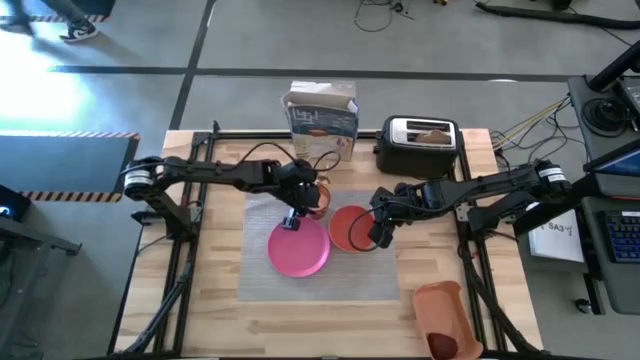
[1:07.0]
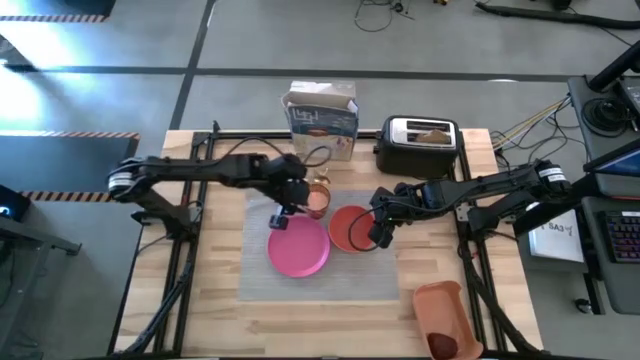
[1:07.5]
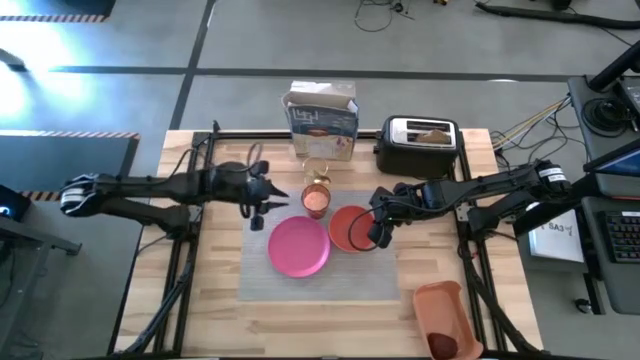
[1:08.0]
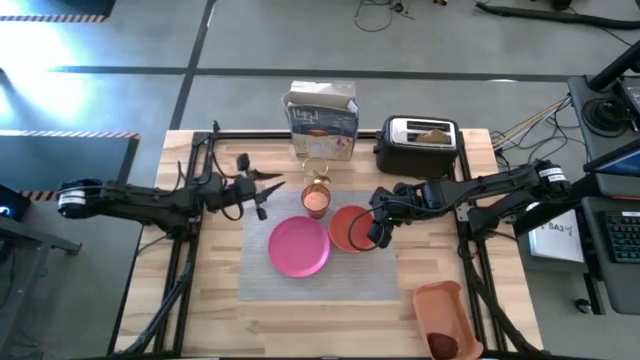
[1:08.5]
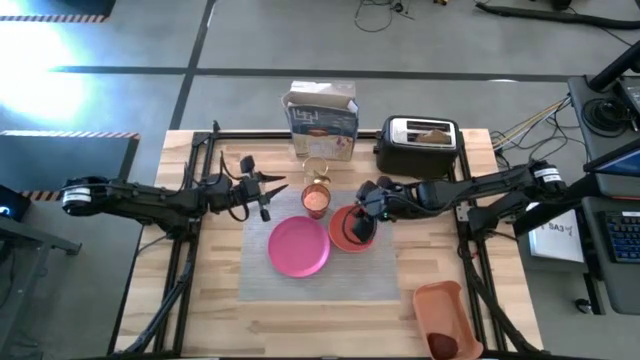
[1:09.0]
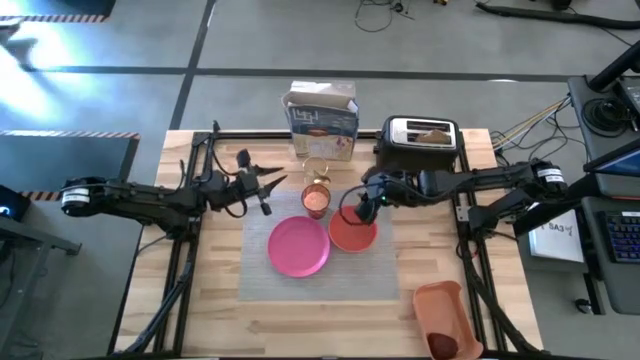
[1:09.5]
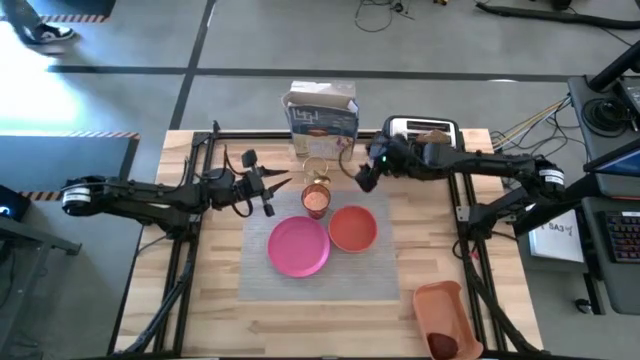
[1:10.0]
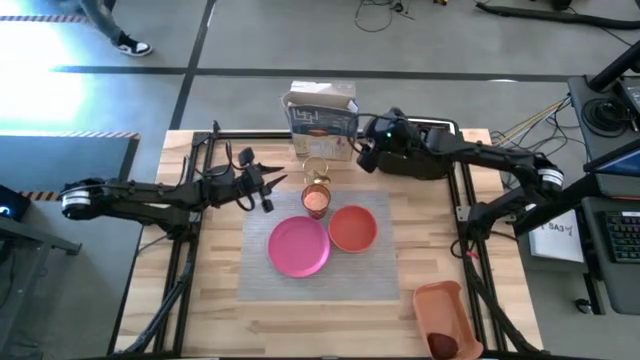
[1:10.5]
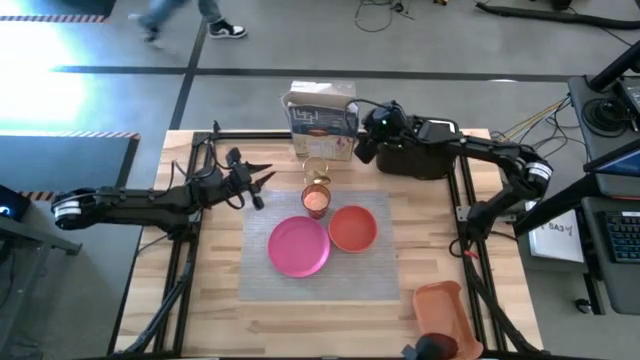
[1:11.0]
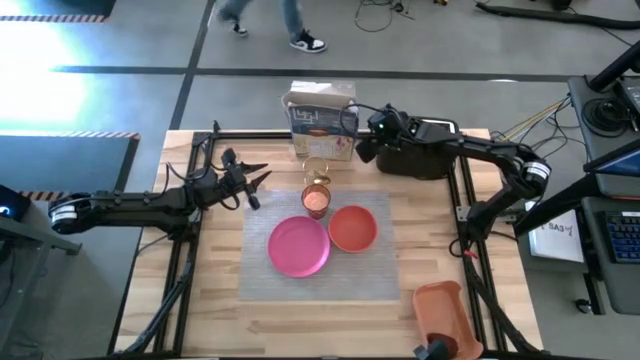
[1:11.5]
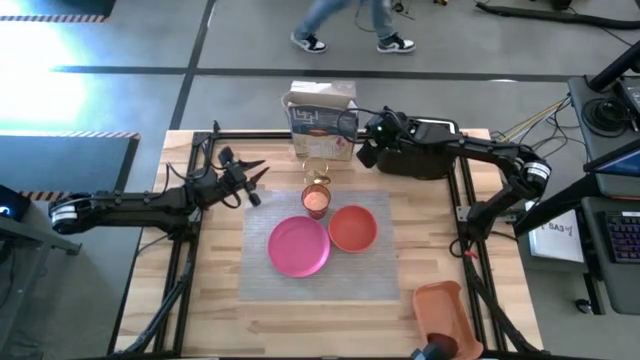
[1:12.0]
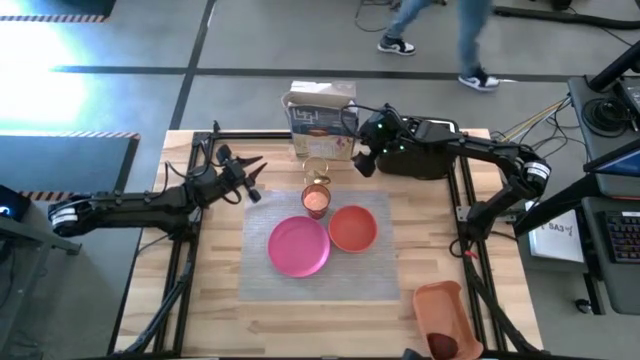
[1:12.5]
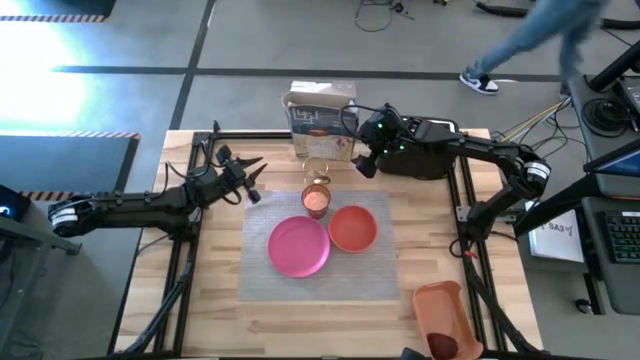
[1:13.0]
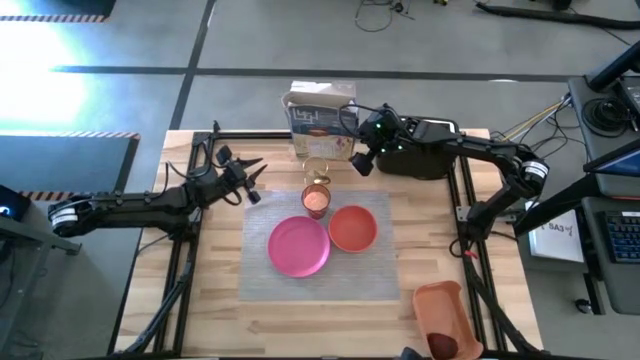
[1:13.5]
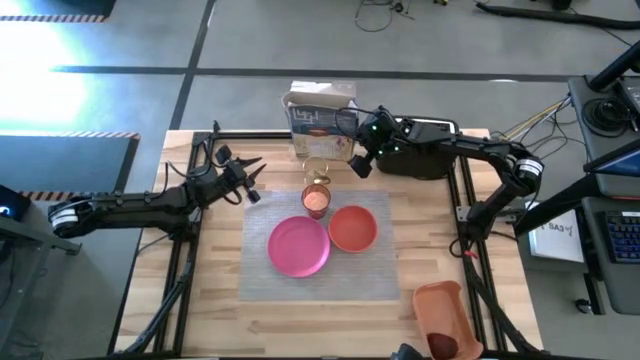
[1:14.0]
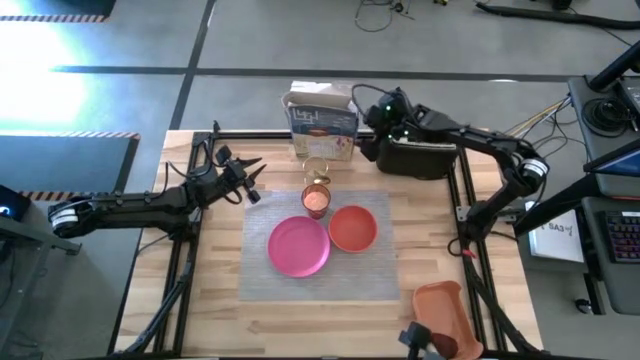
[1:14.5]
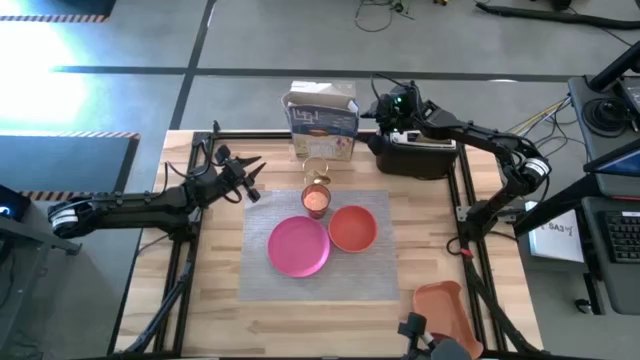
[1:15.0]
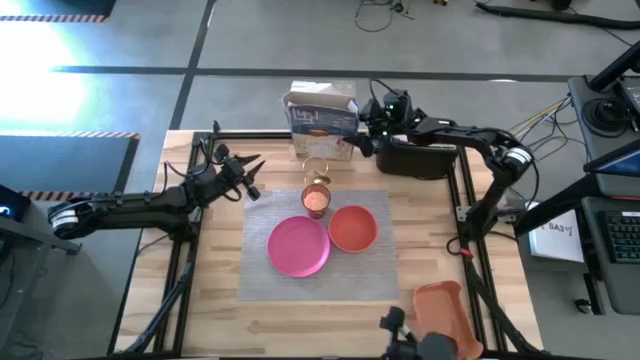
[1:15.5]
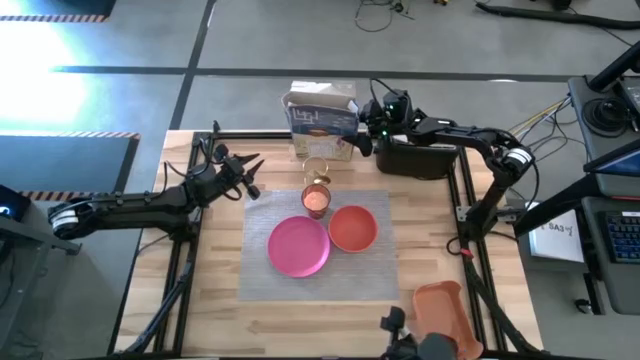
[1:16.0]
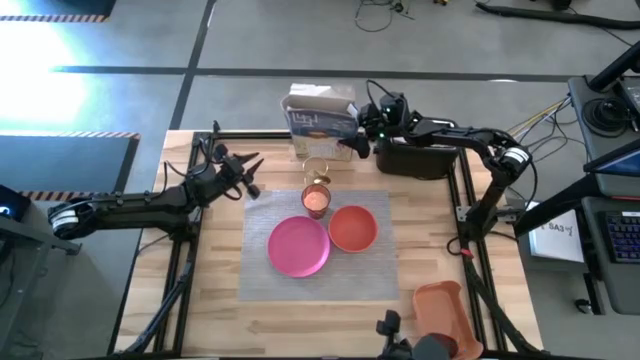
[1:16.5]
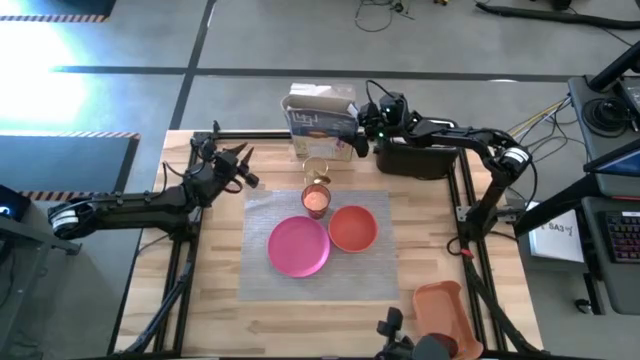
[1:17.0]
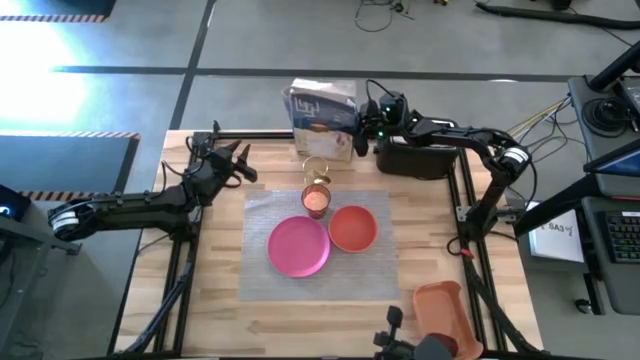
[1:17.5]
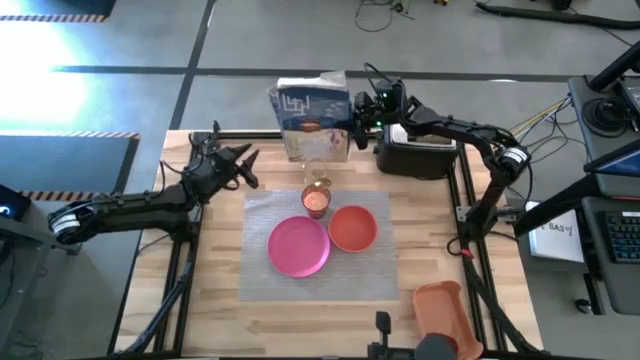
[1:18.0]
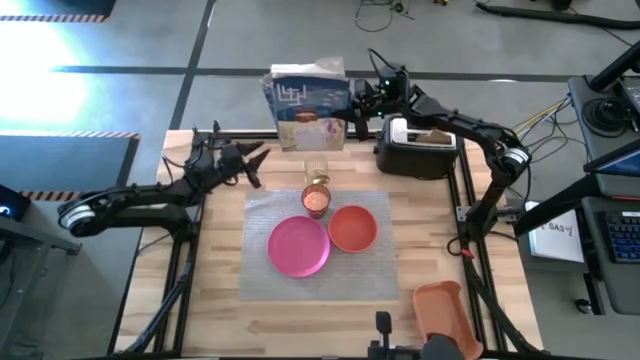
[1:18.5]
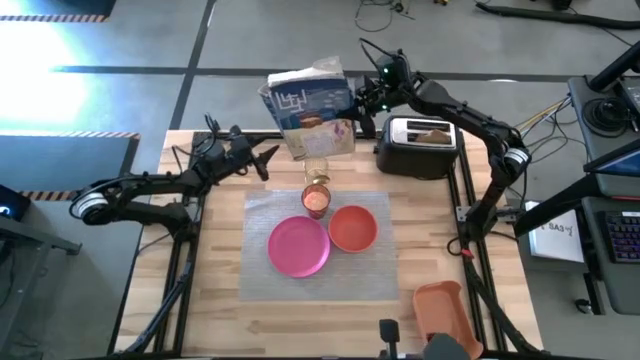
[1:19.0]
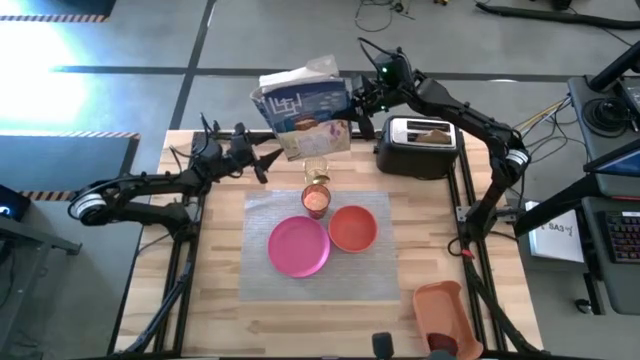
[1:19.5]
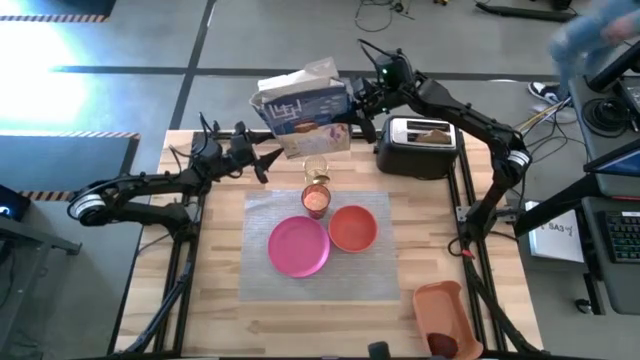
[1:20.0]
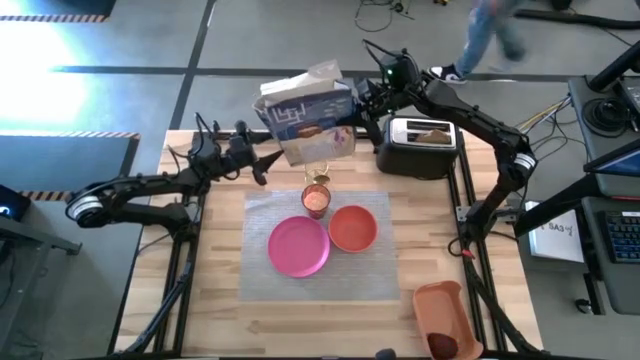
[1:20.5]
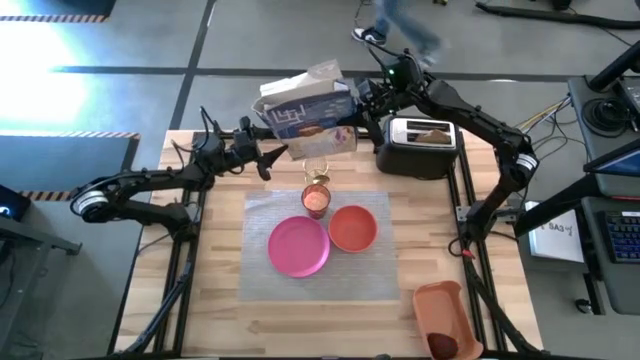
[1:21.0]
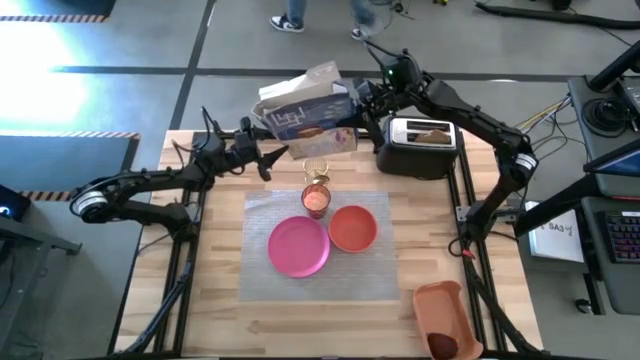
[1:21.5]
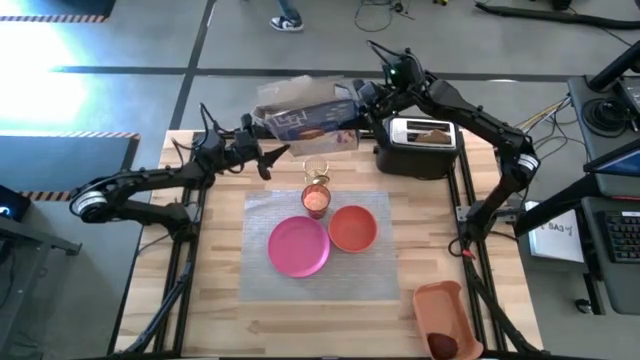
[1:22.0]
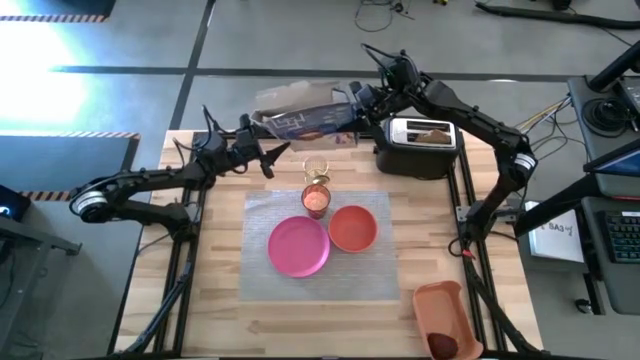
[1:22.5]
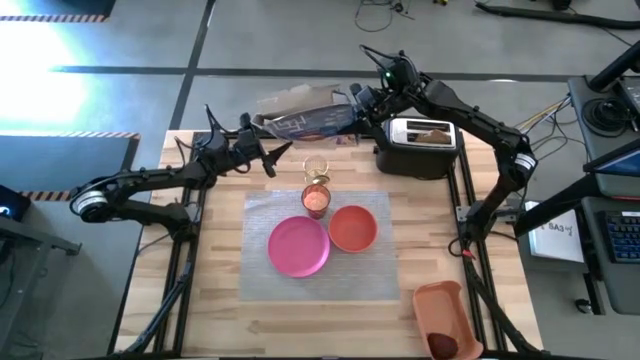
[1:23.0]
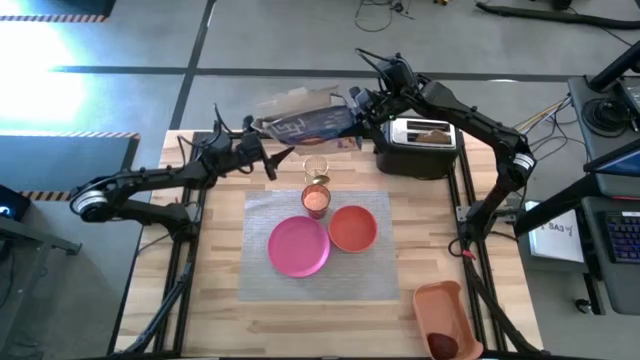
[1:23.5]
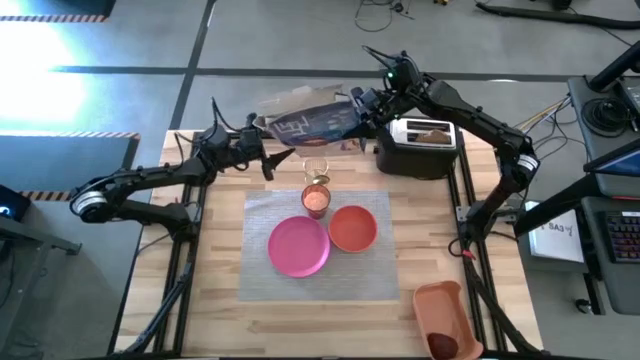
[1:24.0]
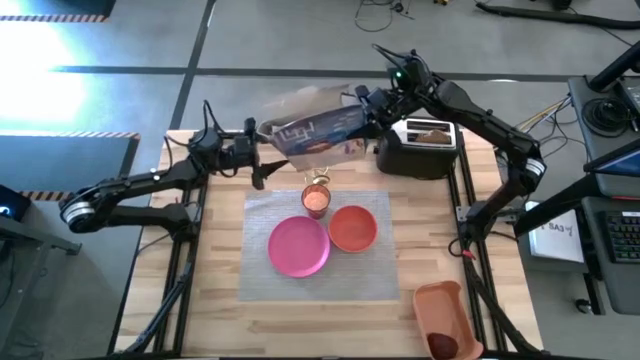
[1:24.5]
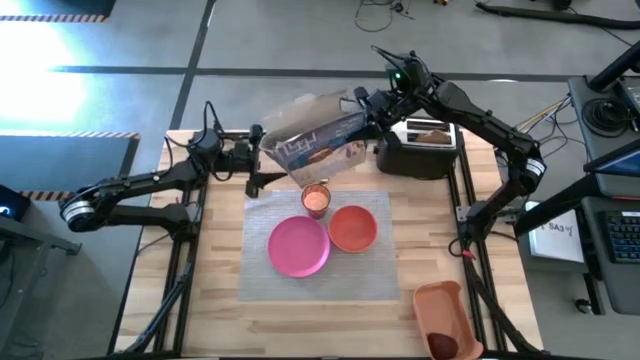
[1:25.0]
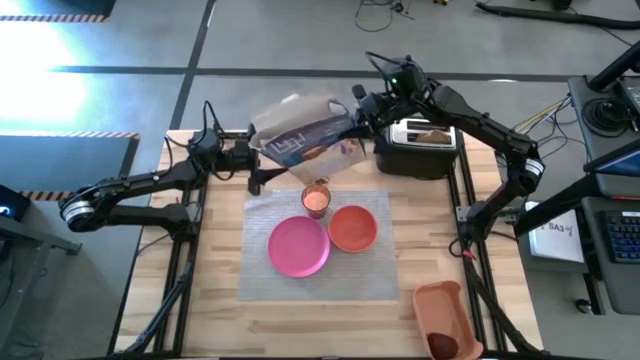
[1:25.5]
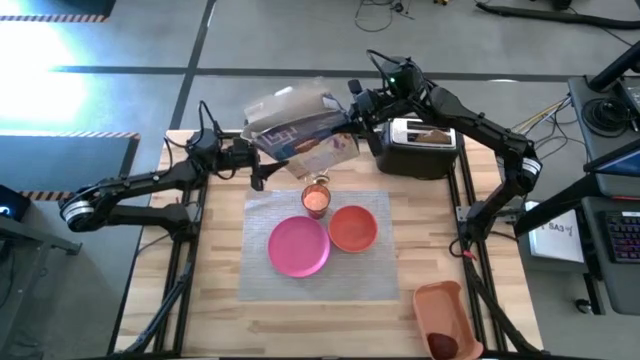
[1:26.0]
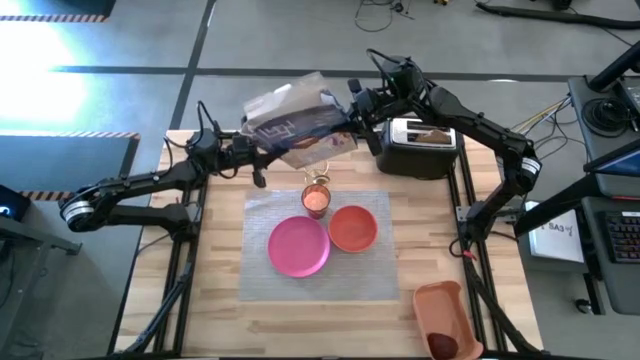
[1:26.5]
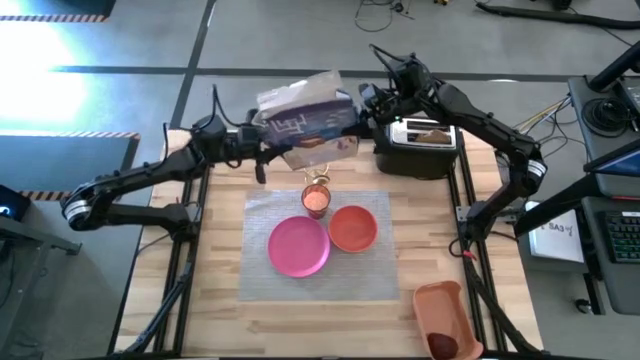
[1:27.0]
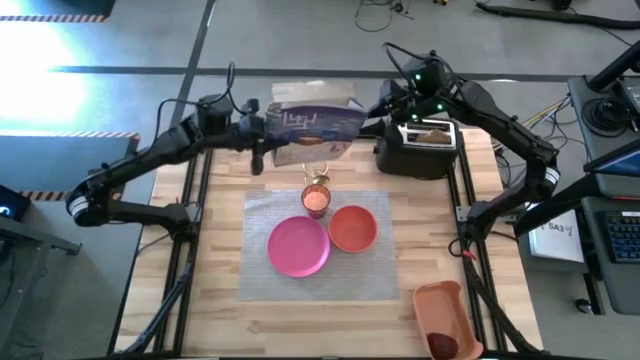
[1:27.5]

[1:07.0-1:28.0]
Task: Arrange a breakfast setting
Pour the cereals from the cereal box into the orange bowl on the table mat
